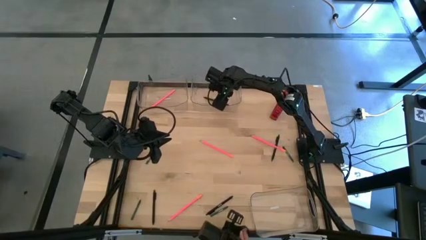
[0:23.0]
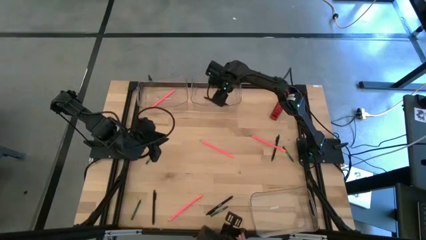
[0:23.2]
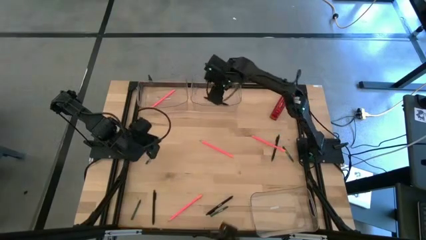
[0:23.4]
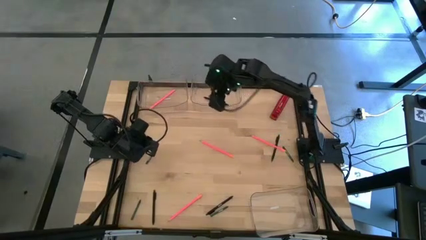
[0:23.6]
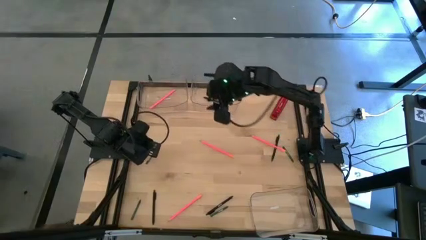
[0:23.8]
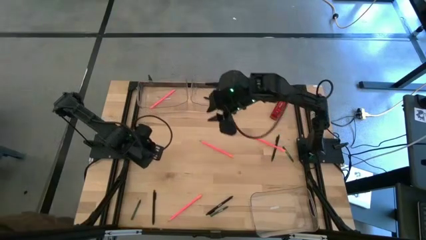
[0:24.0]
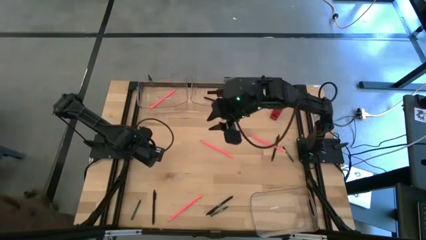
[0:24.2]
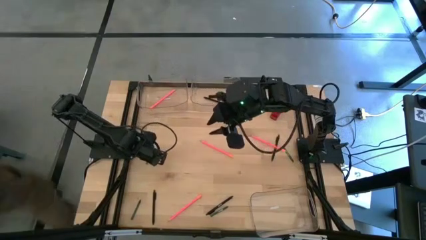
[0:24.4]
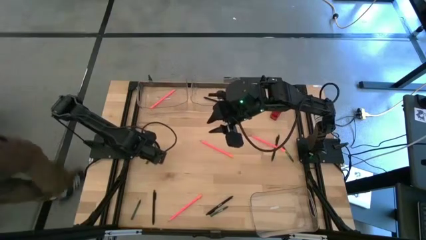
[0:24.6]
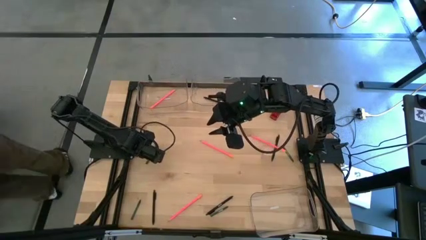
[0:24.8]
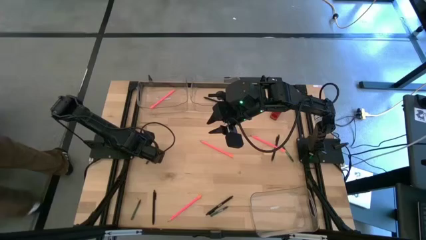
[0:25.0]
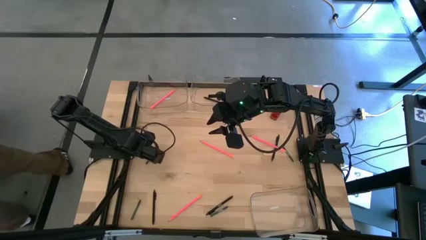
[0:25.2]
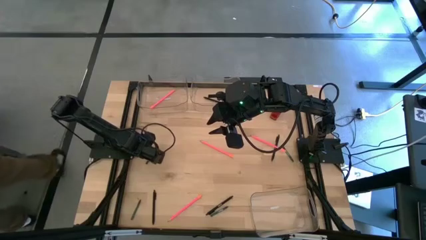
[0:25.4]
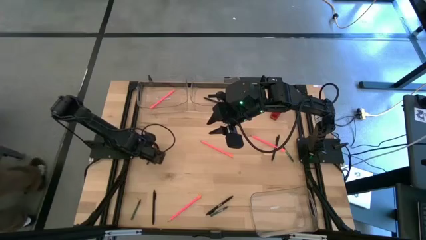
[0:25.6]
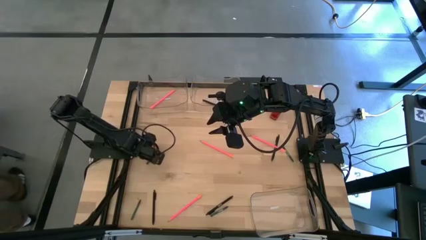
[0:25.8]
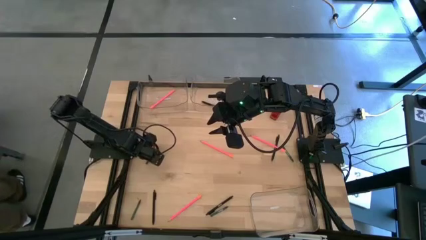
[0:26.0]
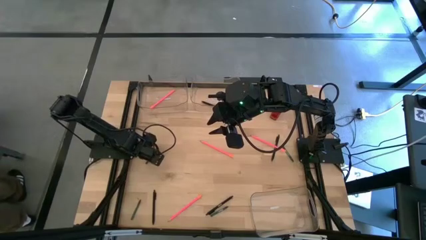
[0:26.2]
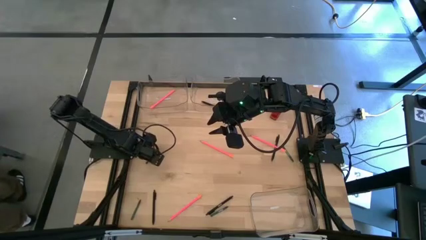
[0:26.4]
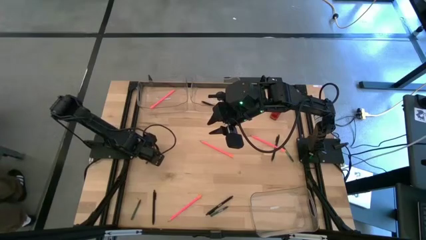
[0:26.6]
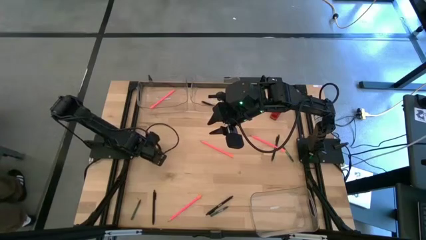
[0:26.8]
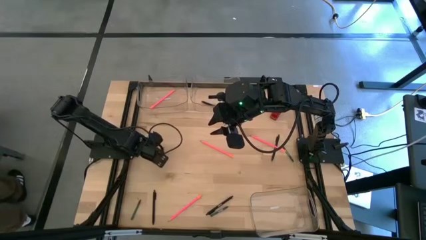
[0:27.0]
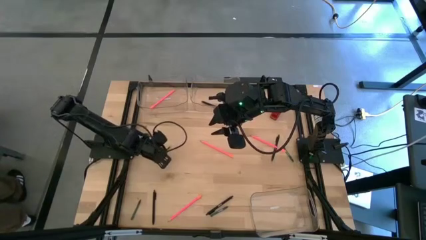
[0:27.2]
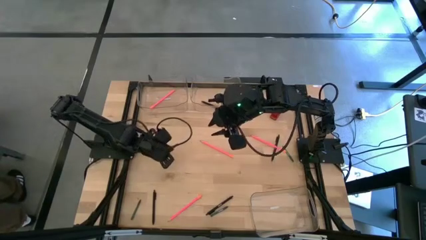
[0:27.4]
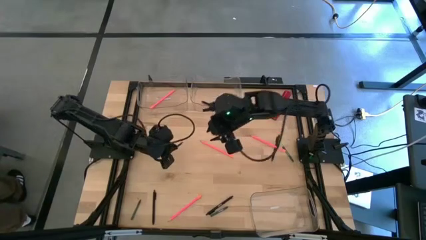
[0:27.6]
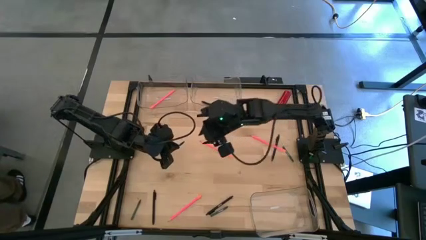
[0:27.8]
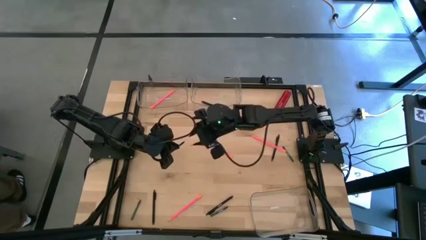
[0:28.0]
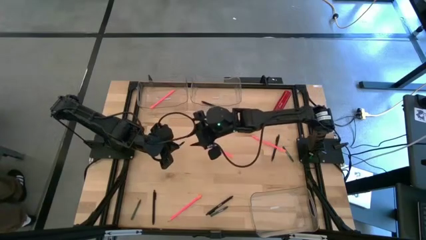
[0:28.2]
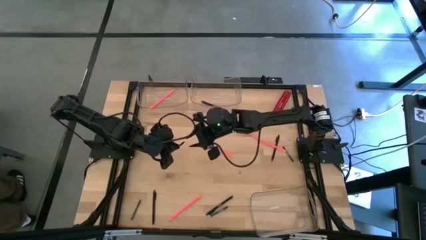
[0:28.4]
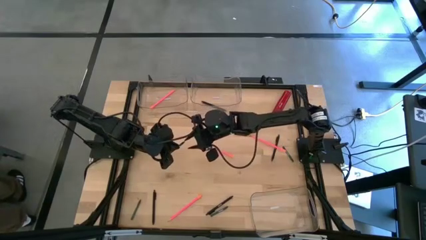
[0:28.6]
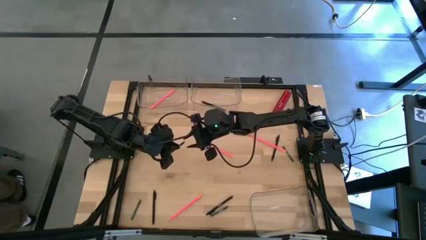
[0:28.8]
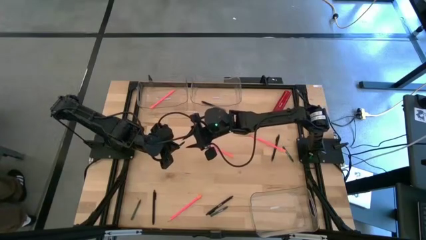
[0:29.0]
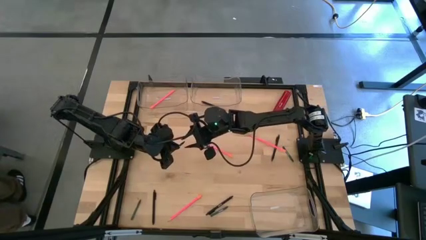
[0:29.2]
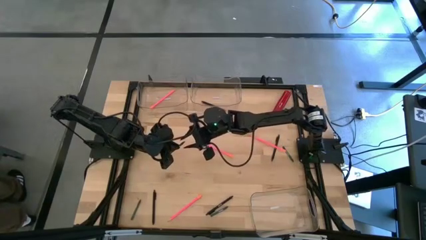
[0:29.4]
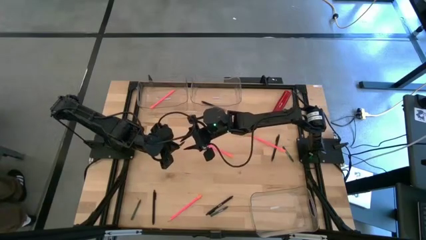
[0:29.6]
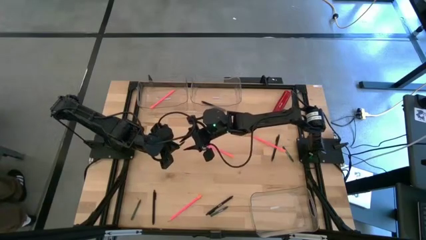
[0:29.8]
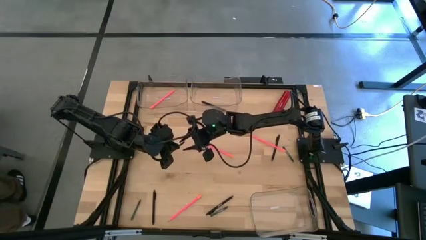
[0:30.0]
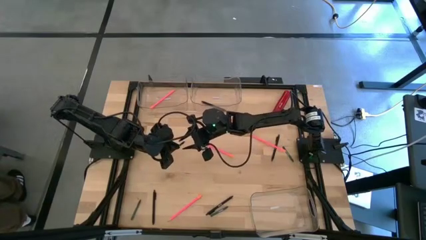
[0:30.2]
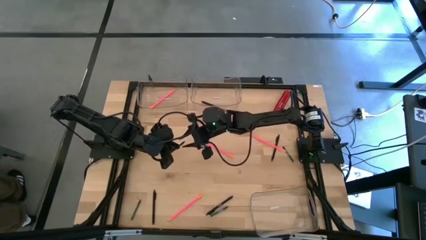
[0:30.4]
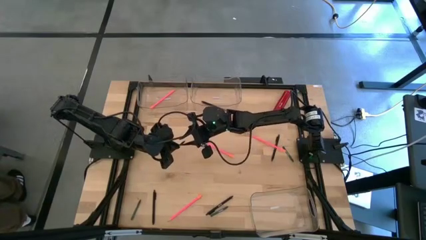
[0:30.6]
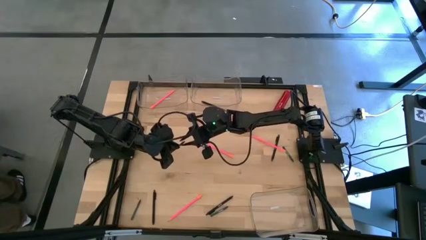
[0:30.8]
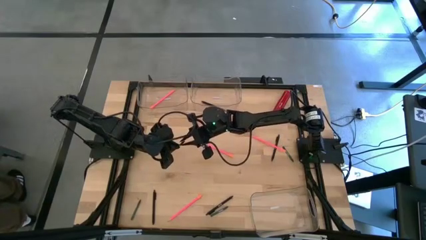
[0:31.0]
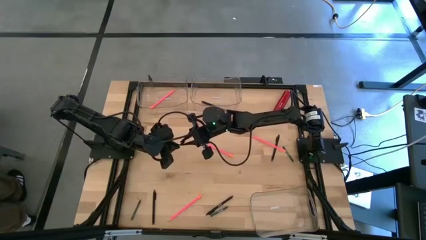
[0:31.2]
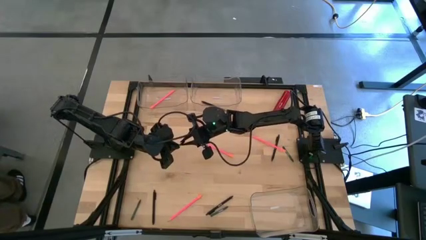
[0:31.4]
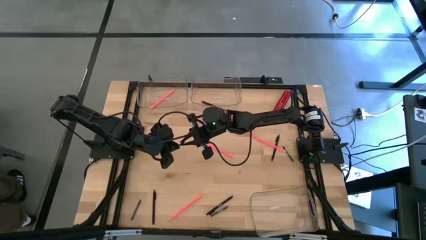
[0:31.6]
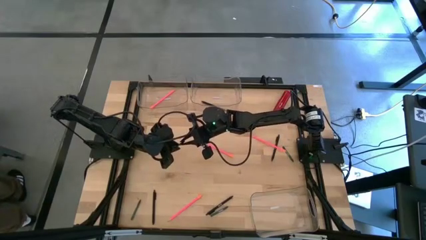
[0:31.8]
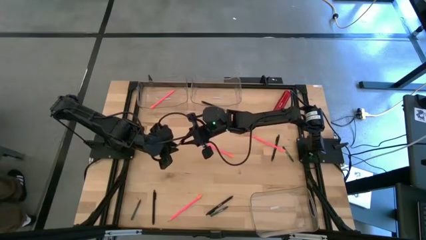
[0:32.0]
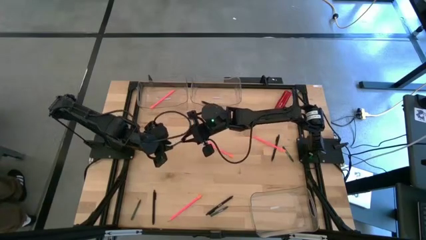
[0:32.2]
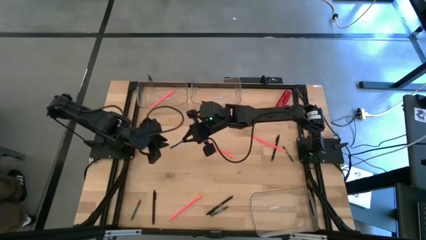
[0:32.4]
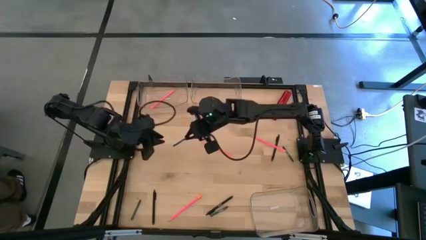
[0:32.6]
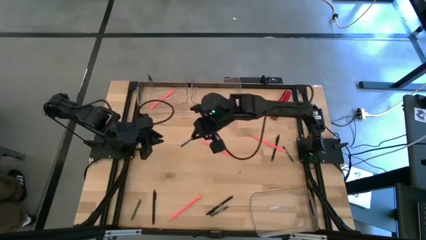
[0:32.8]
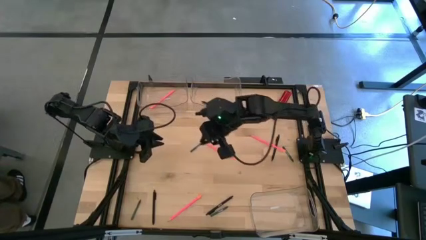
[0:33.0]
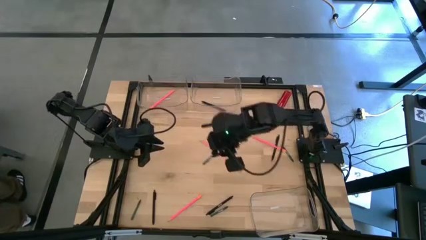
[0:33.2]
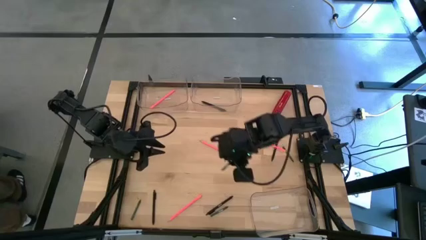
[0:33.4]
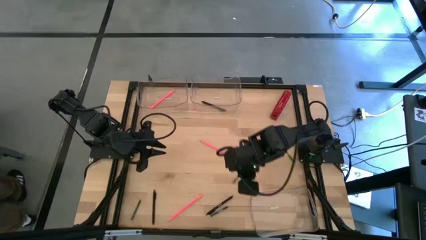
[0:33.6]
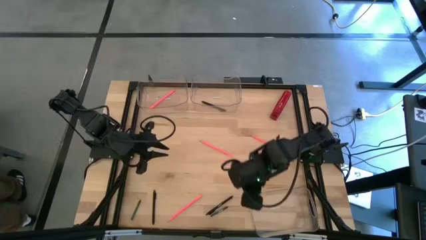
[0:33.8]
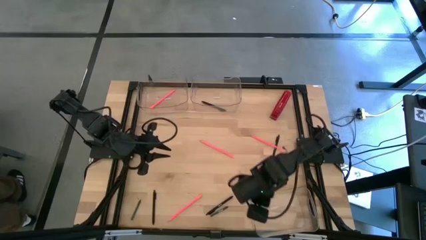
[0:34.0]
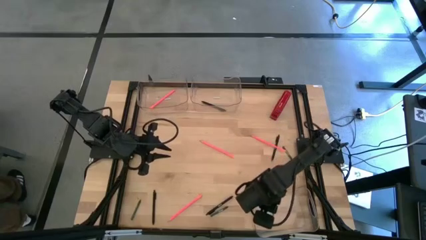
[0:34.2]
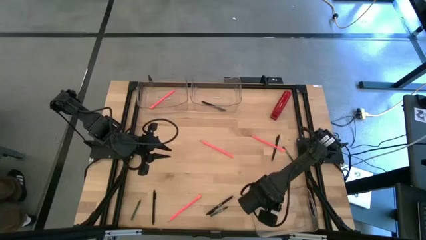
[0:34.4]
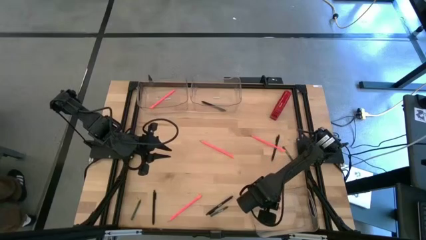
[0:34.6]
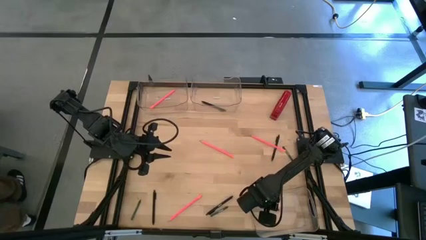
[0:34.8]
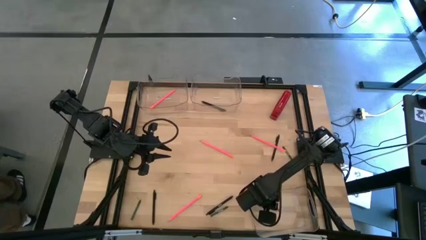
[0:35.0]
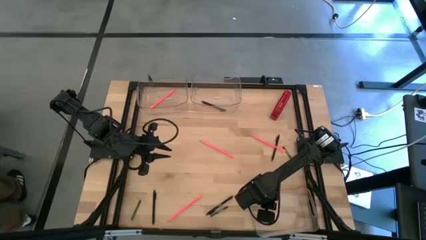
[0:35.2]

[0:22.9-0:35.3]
Task: Sort crayons/erasers/pens/pencils in bins
Put the green crayon into the bottom transparent bin
